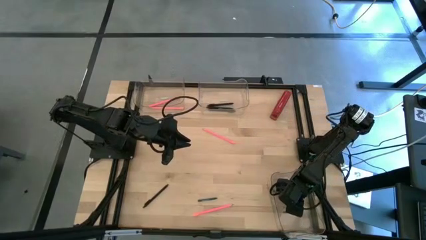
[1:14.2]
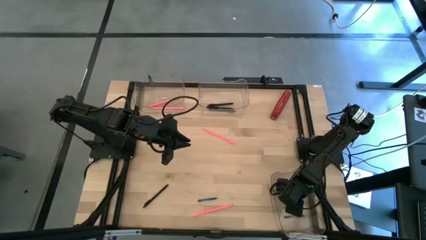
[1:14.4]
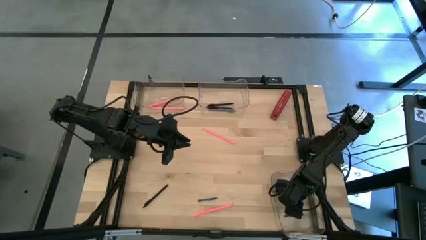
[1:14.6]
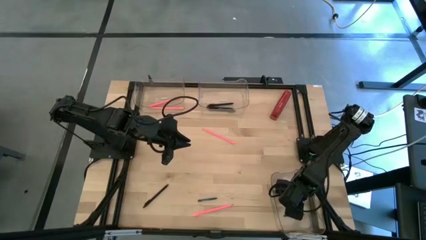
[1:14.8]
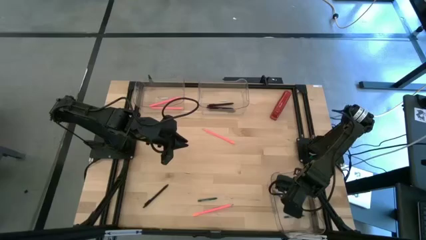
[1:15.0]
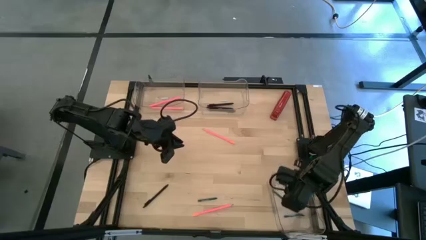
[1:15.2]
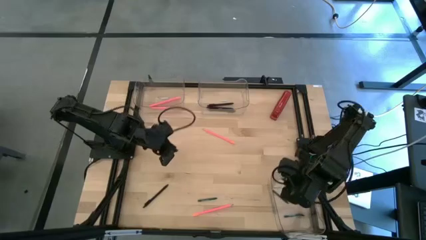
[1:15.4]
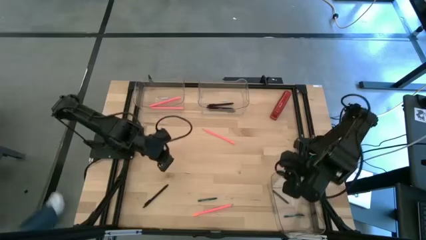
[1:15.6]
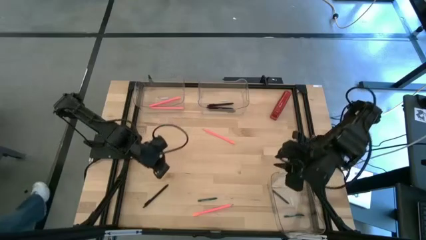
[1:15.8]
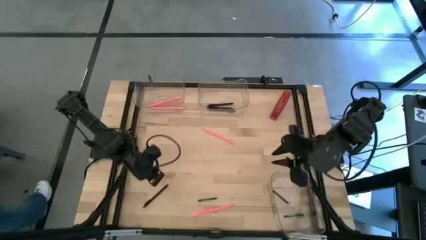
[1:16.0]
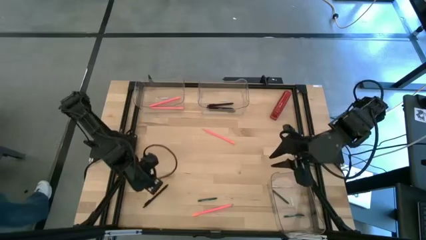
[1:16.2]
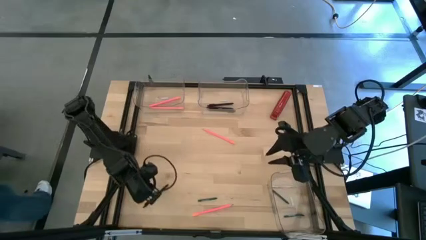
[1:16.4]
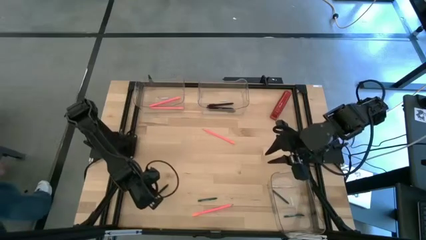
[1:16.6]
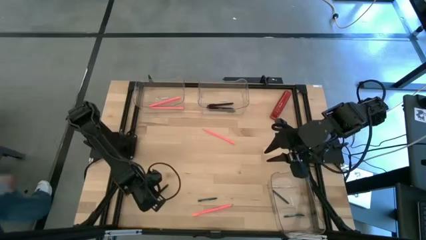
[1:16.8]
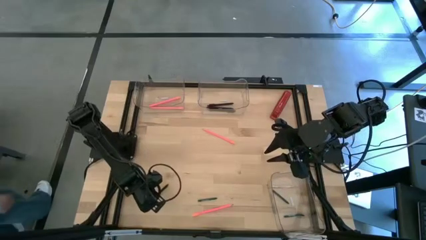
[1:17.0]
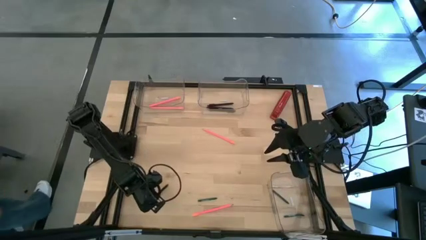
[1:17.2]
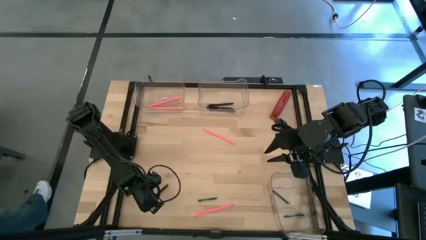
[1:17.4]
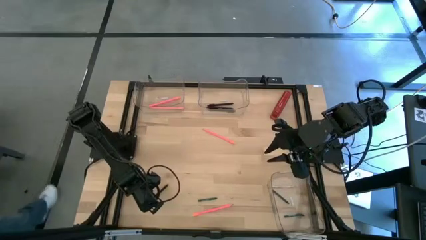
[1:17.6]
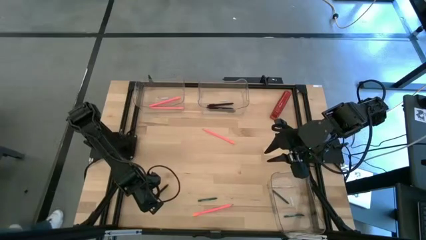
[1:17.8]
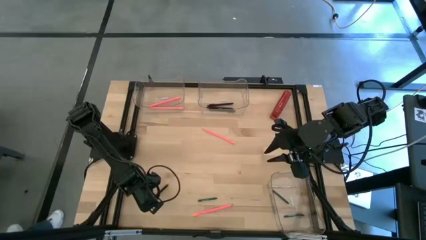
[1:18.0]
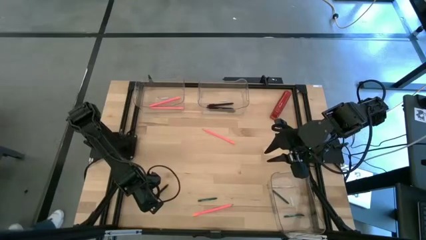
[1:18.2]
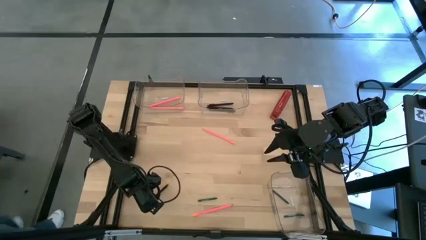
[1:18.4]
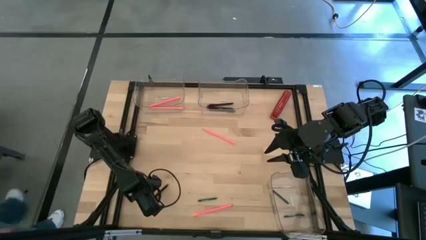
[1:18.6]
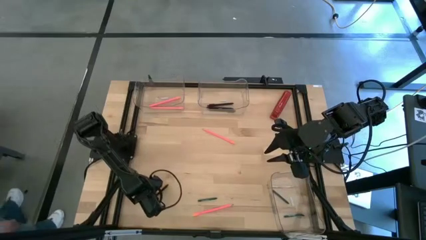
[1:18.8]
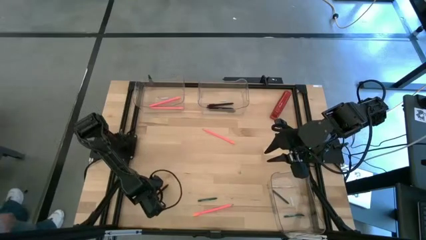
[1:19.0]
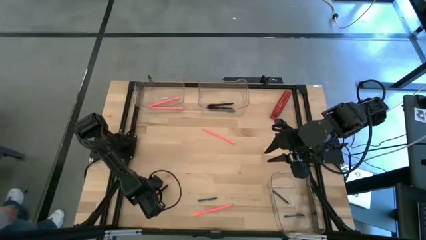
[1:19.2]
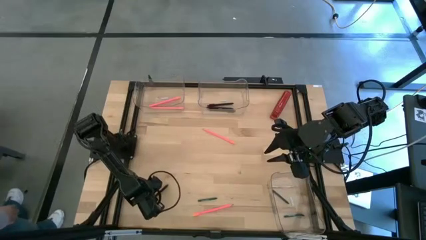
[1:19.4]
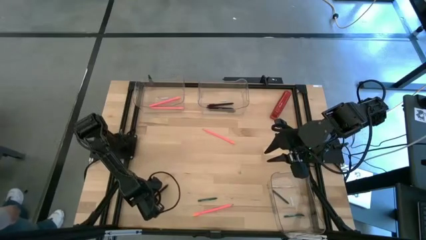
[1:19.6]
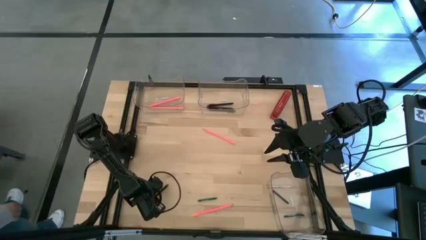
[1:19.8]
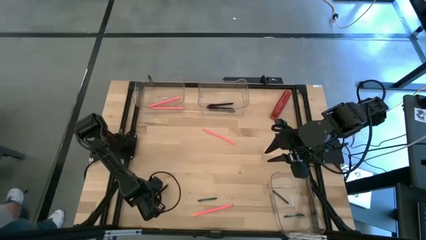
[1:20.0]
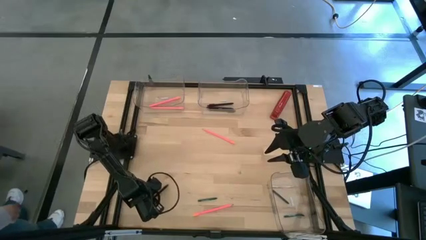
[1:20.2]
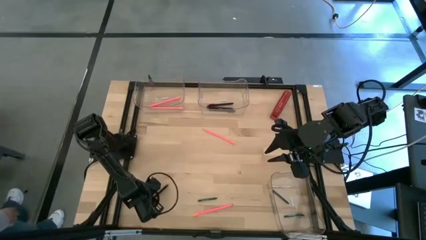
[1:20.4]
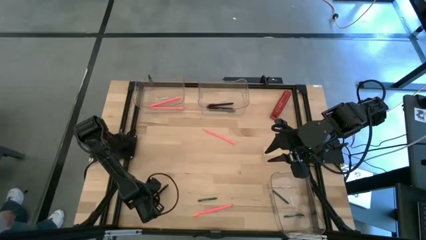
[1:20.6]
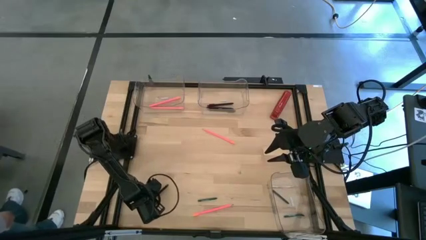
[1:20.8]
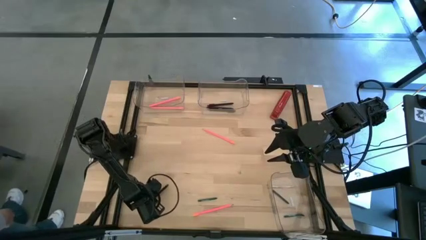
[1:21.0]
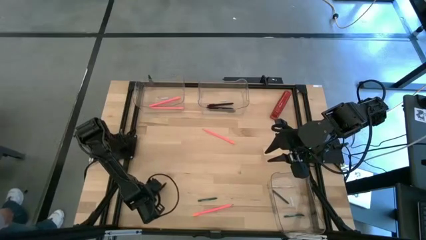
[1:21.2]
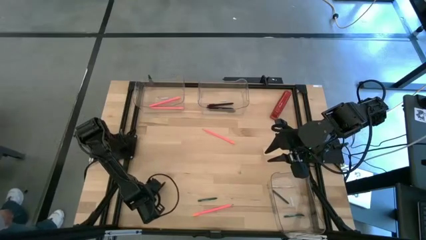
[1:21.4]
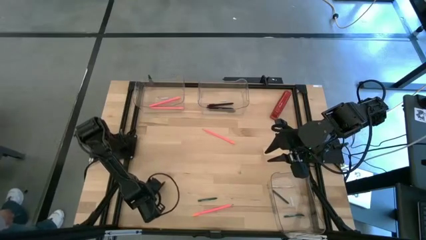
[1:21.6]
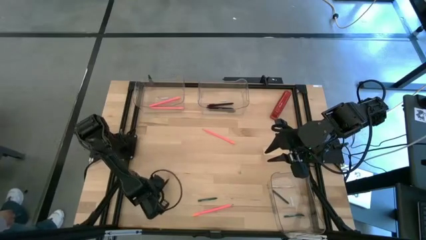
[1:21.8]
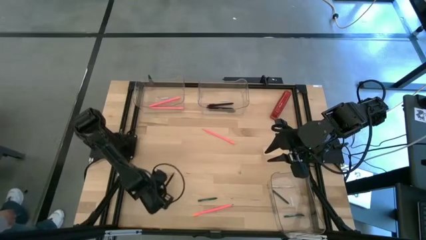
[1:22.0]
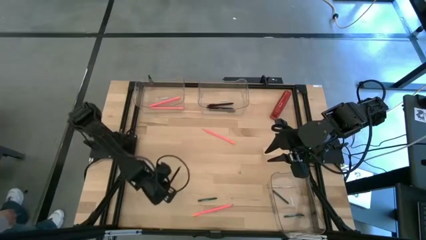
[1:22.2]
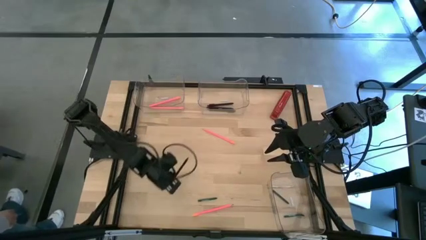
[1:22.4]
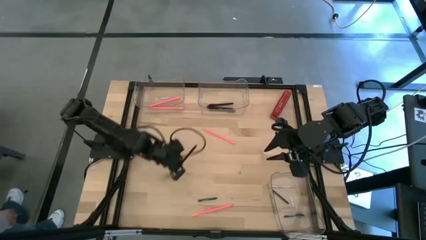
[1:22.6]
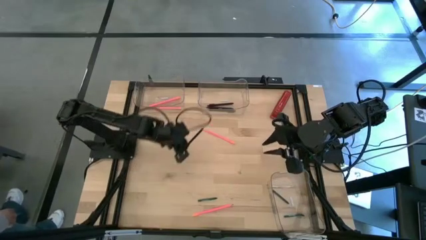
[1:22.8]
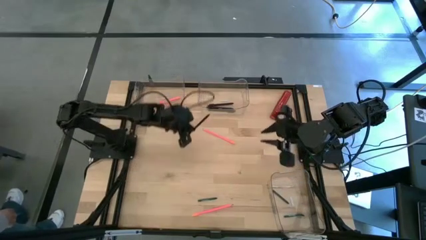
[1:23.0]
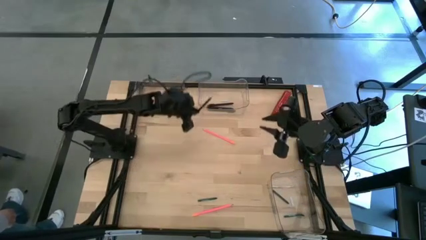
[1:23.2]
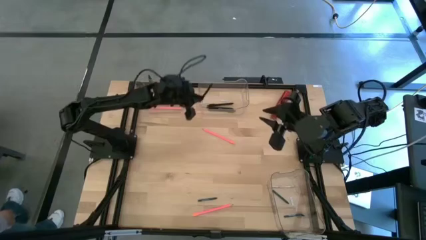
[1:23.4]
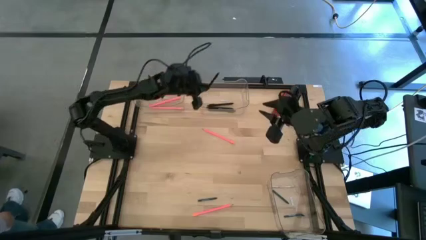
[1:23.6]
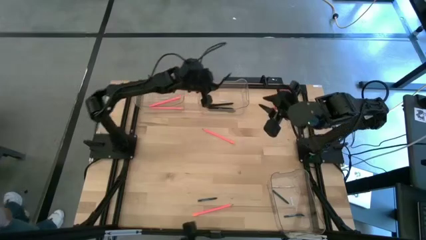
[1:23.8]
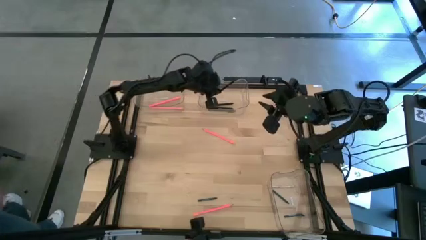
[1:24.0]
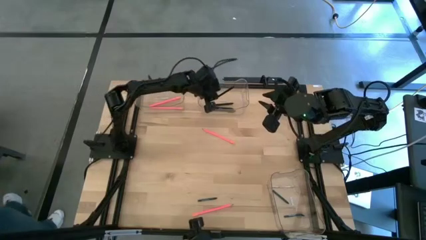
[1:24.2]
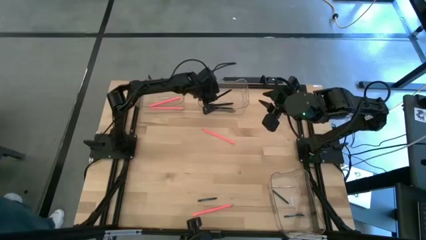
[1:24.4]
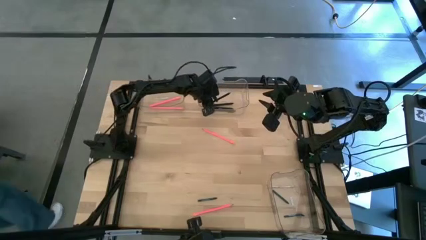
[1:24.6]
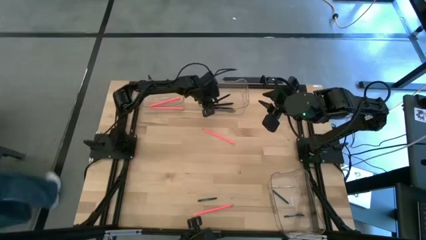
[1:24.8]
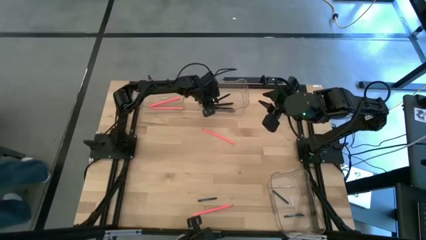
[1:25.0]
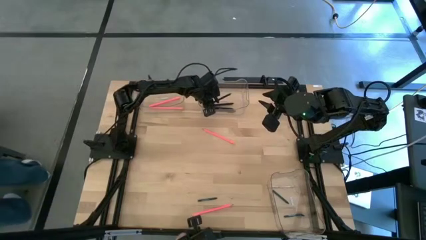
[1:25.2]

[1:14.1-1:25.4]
Task: Sort crayons/erasers/pens/pencils in bins
Put the black pen into the top right transparent bin

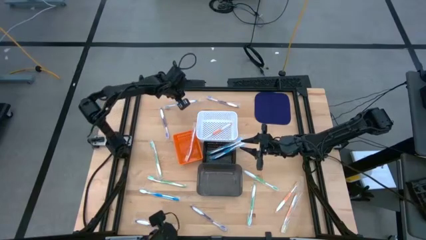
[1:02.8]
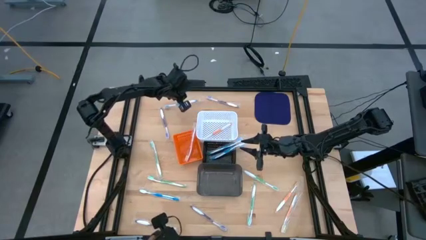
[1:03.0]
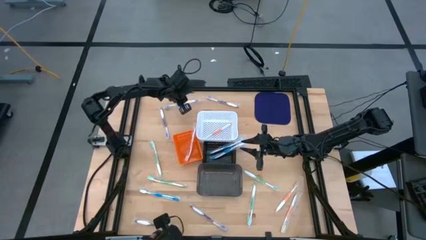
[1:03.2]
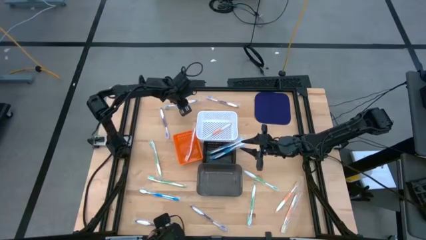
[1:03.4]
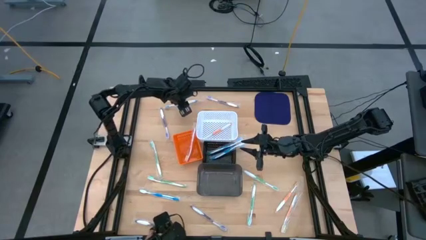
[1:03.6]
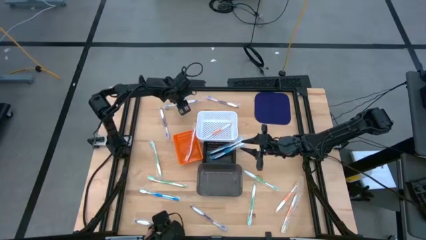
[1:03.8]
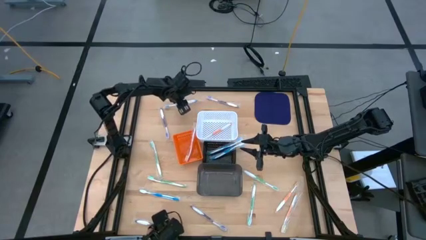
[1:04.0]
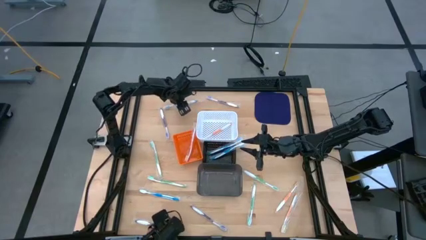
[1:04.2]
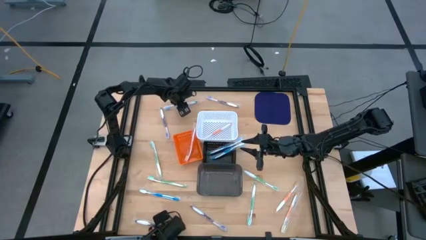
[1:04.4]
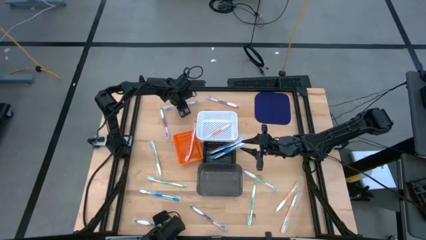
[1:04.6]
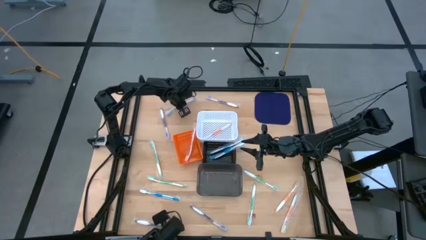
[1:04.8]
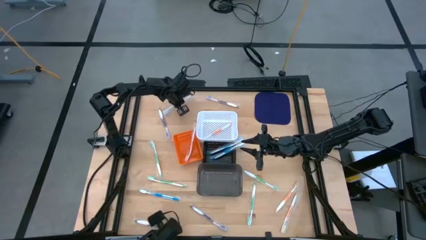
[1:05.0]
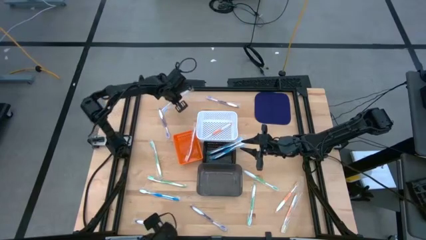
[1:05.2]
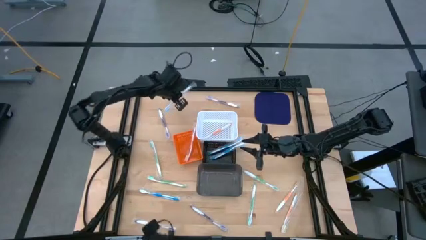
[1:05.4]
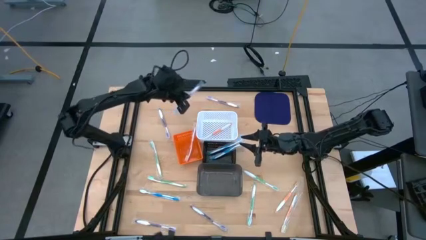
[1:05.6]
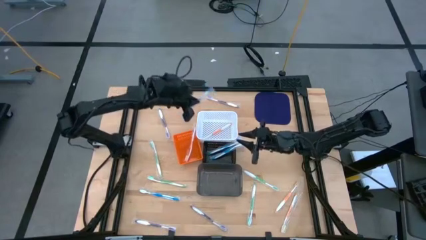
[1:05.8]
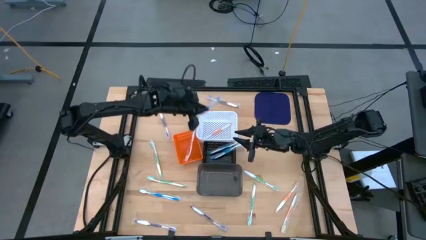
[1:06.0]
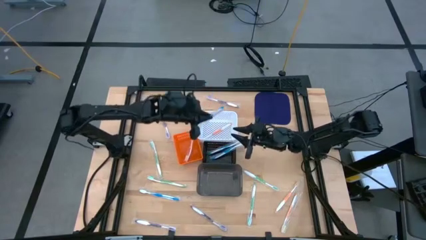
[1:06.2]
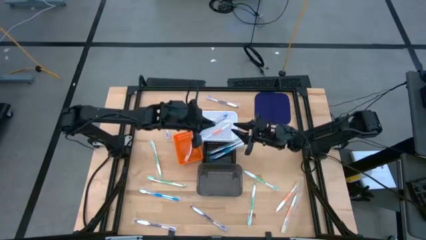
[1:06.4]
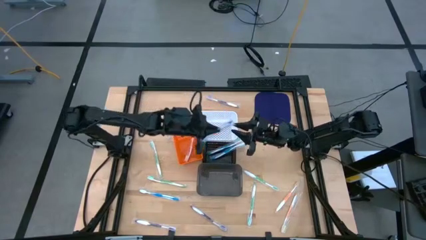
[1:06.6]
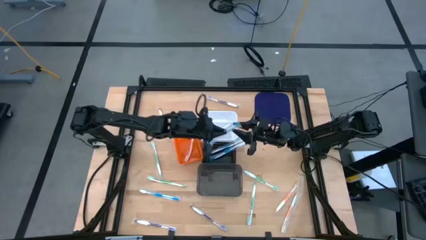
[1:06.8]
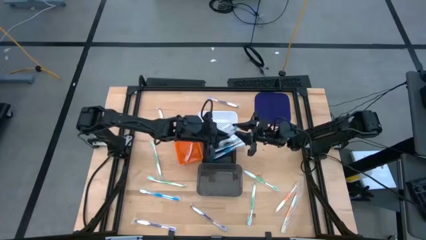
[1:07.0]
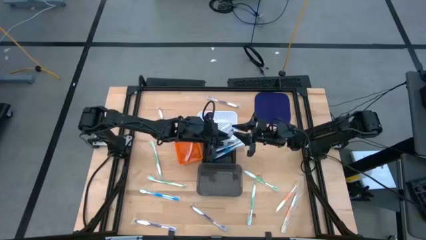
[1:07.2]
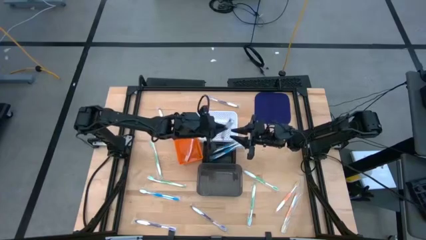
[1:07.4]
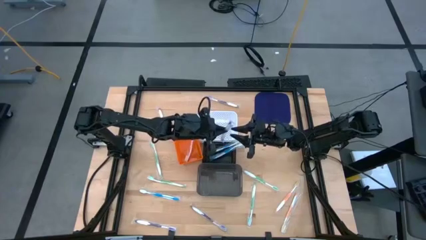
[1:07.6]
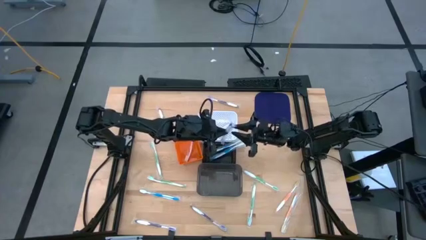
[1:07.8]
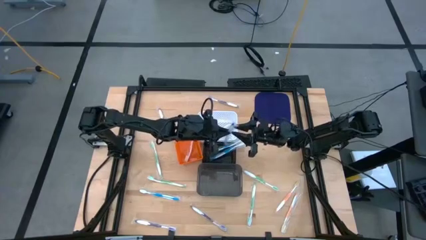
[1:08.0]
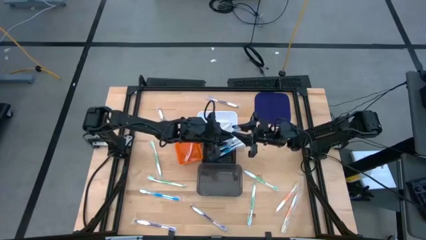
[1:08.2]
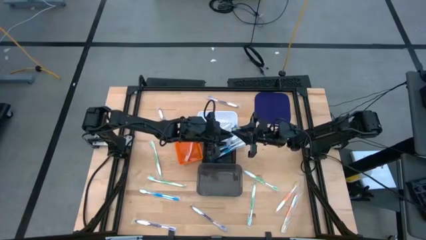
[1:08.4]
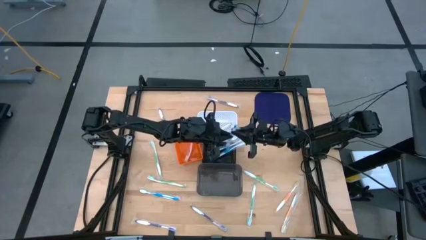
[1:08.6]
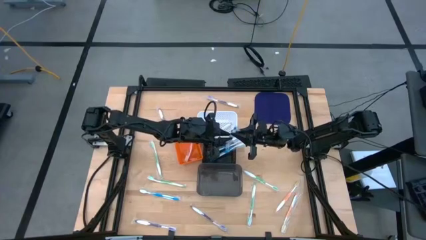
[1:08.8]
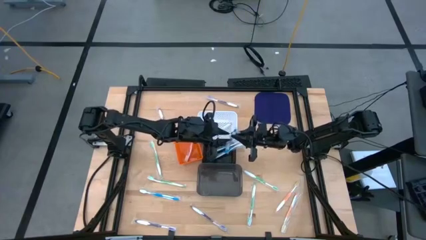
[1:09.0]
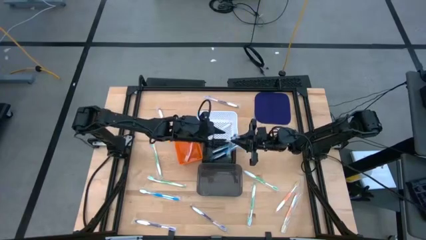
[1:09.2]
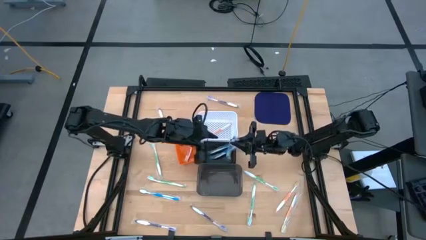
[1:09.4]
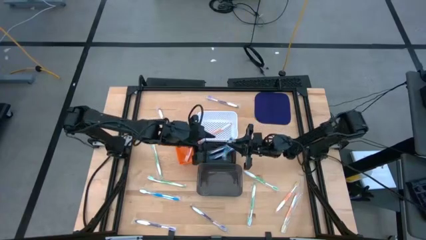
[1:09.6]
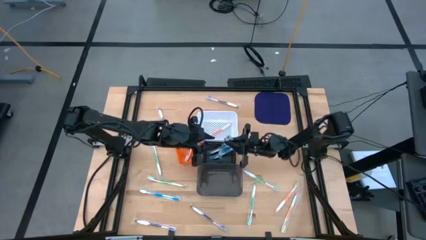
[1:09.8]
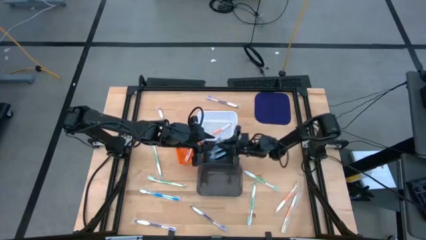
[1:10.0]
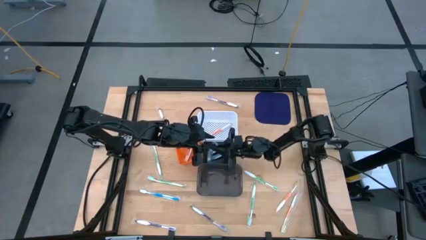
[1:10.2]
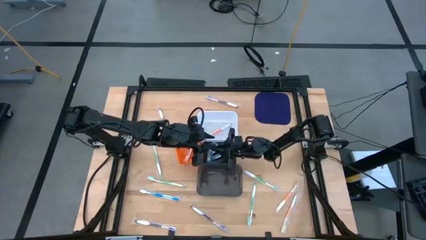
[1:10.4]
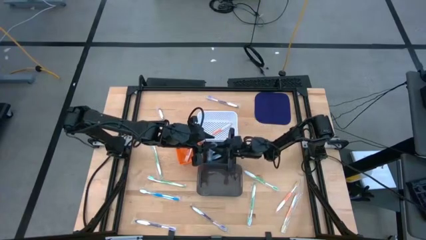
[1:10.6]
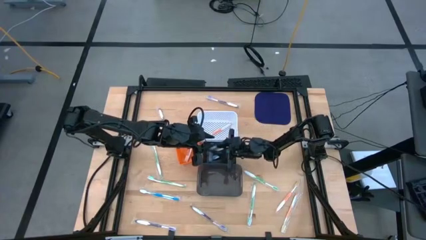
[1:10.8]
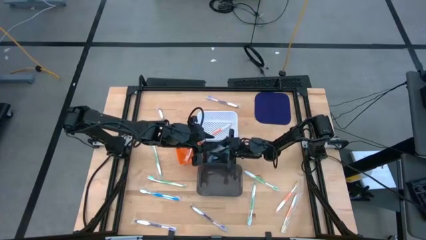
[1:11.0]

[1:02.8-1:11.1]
Task: Pick & Place Toothbrushes
Put the top blue toothbrush into the top black basket
